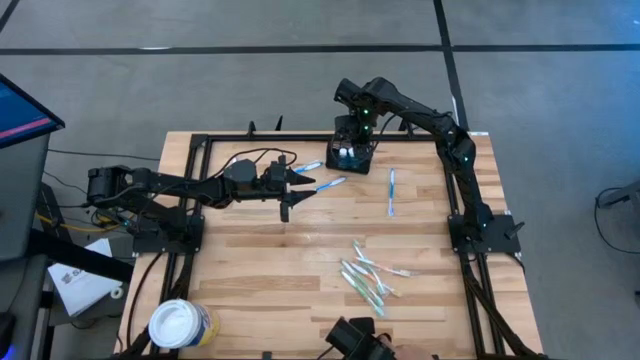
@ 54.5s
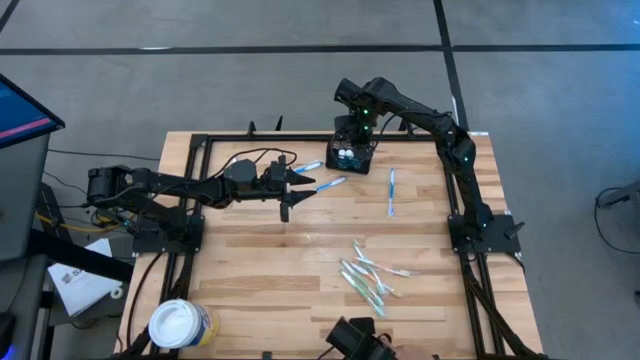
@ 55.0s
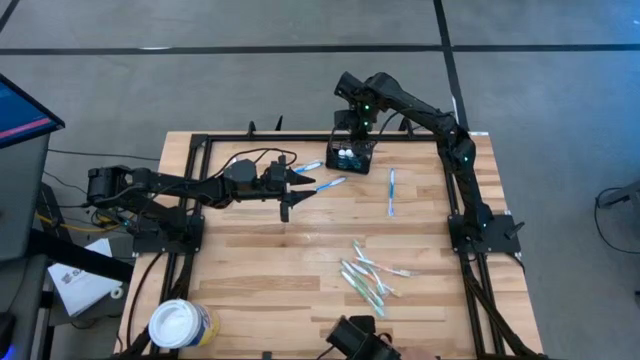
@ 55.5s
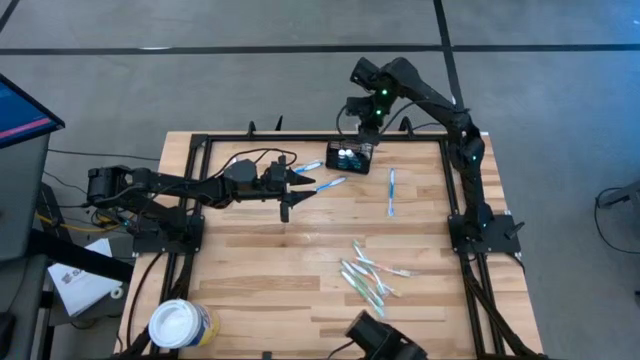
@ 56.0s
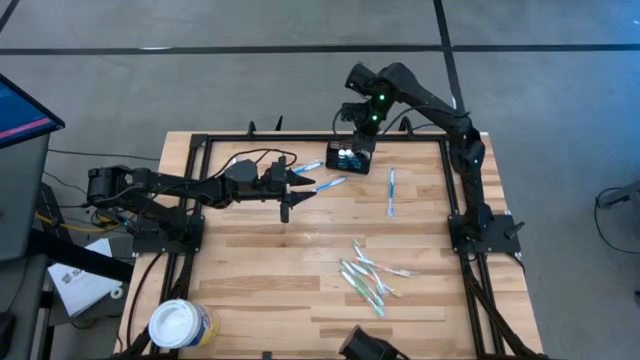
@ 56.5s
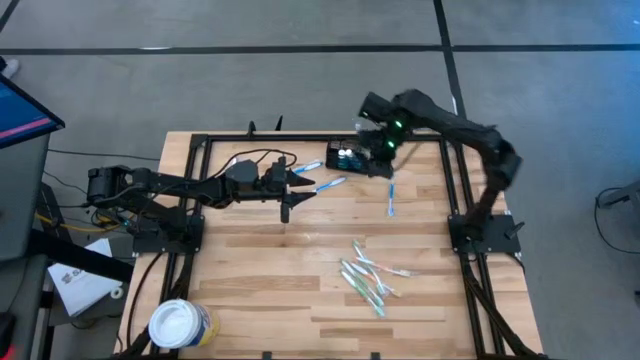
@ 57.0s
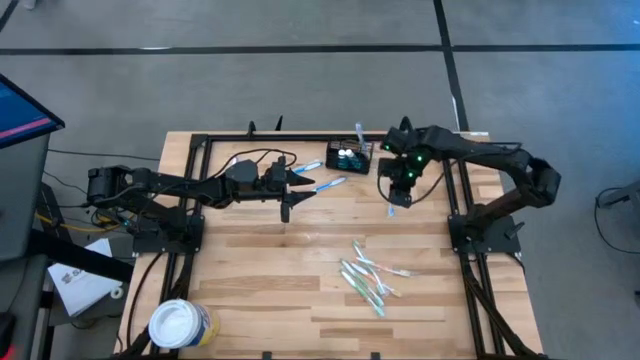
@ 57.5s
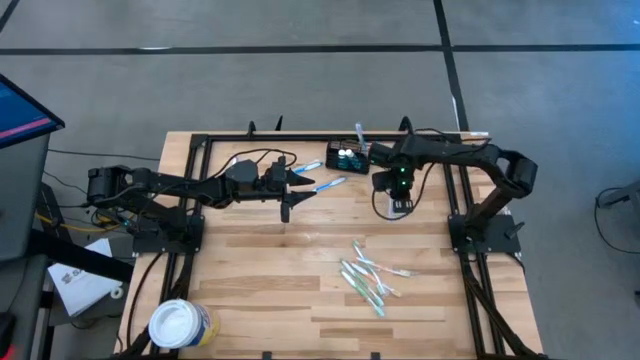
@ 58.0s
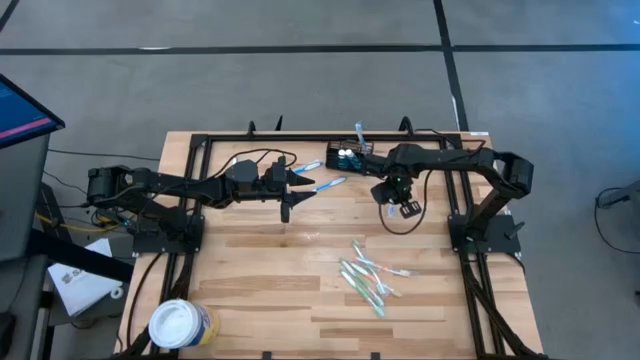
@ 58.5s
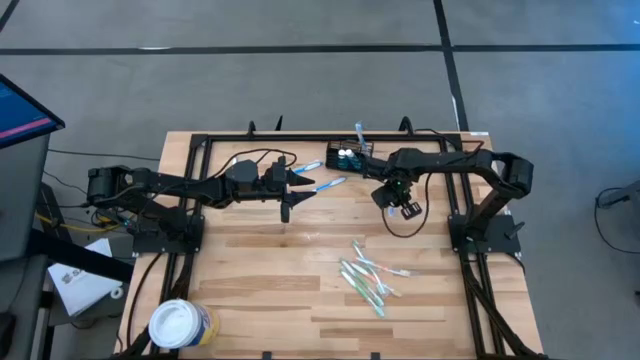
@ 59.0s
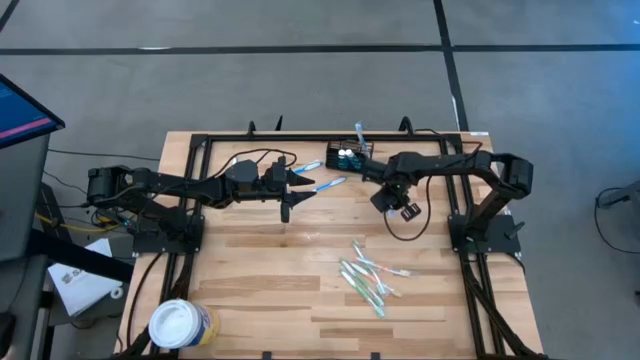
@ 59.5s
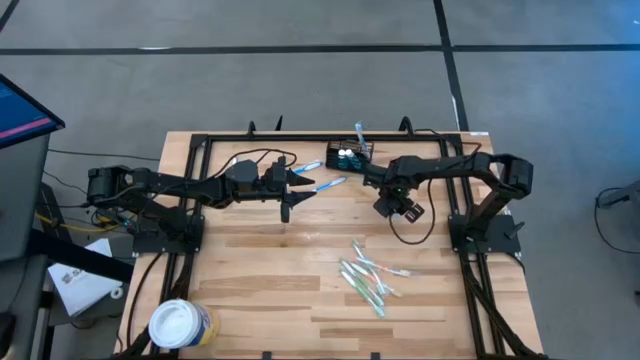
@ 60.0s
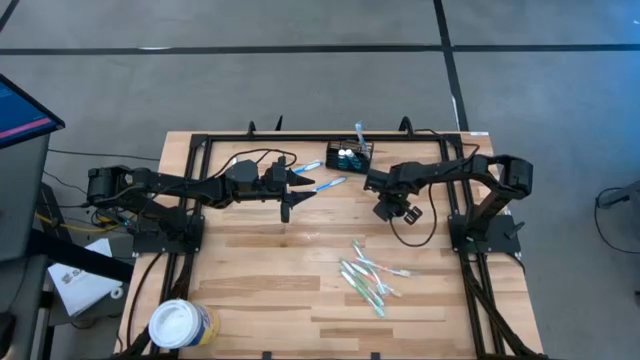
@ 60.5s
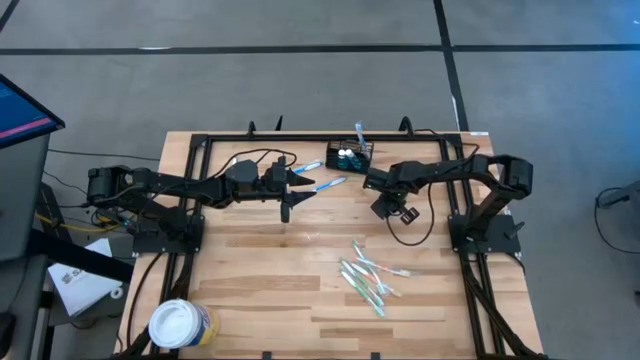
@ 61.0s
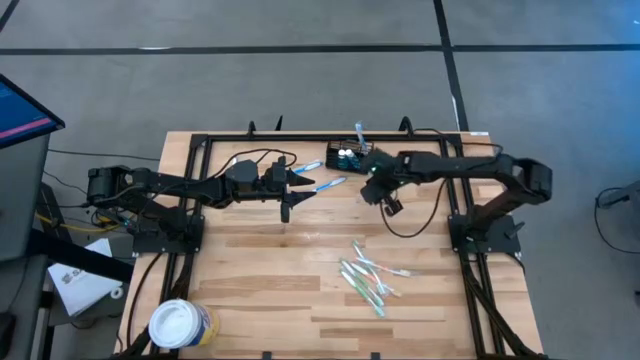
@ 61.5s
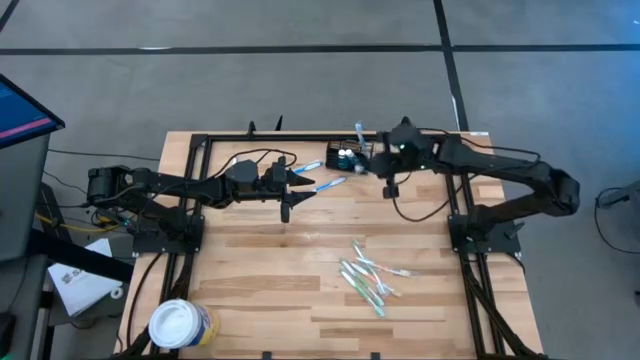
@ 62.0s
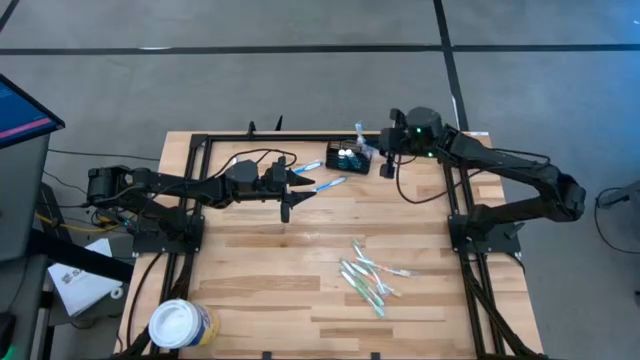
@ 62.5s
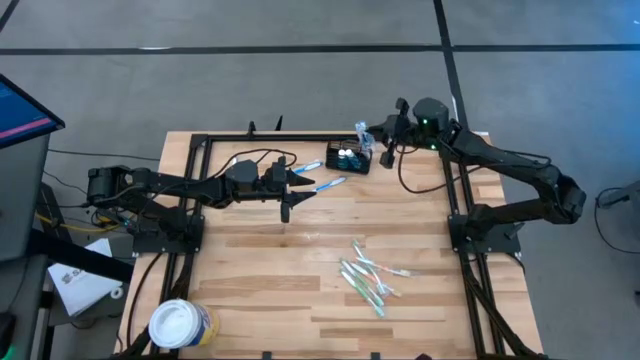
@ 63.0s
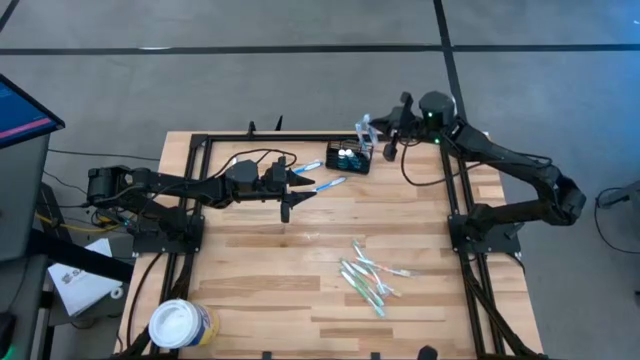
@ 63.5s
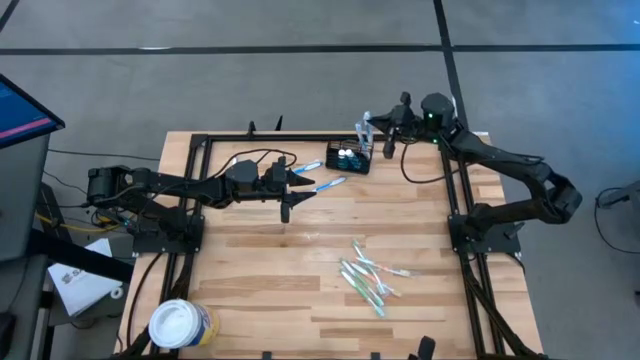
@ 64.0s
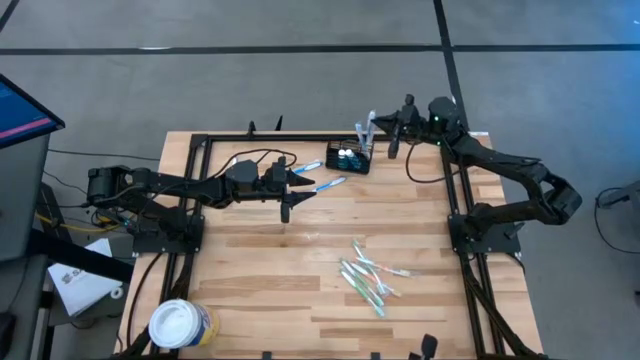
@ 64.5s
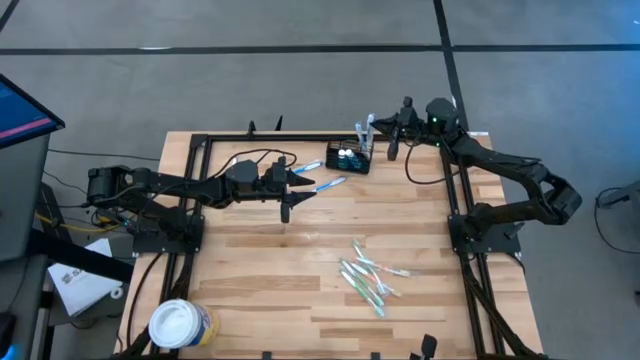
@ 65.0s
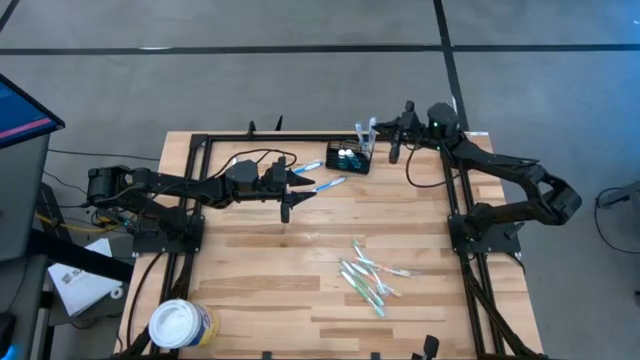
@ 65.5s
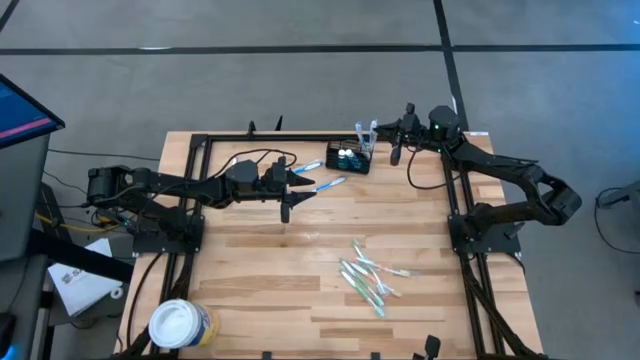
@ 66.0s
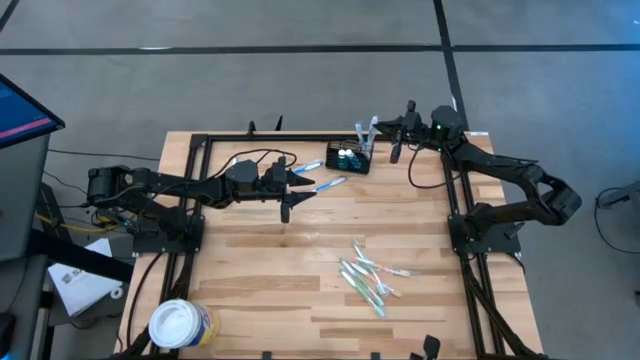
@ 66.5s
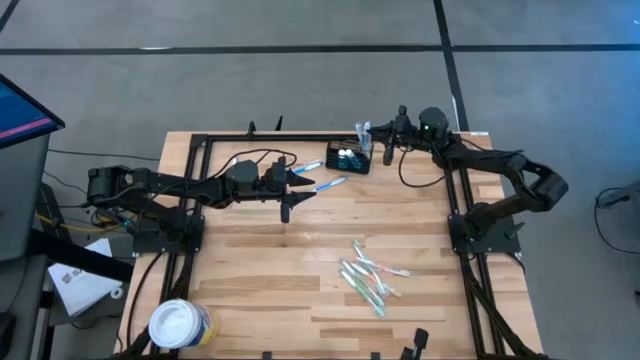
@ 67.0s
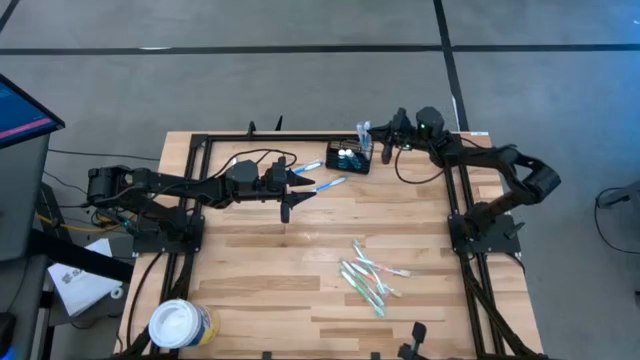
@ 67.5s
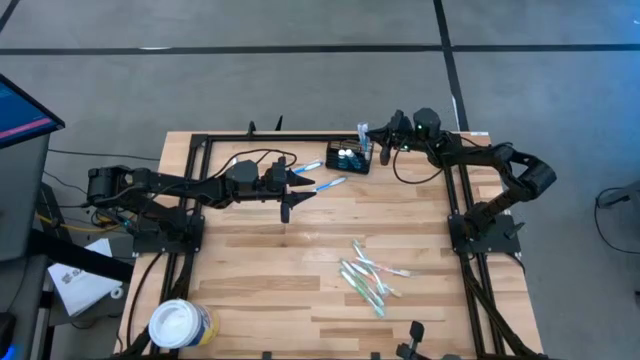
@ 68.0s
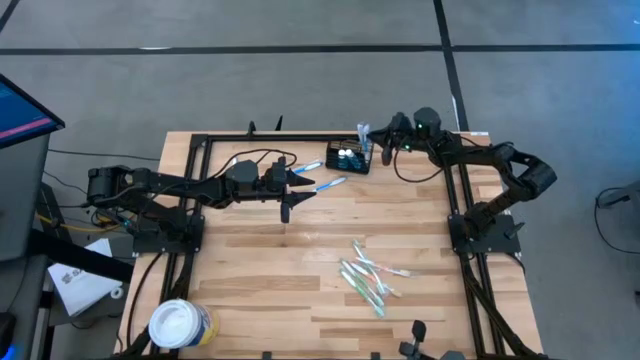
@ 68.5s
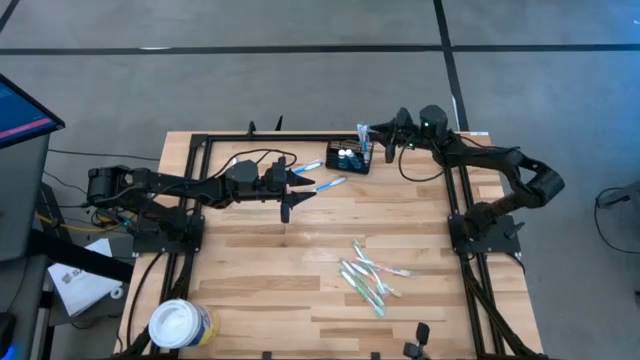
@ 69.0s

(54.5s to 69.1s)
Task: Pick & Place toothbrushing station
Put the blue toothbrush into the mesh organizer

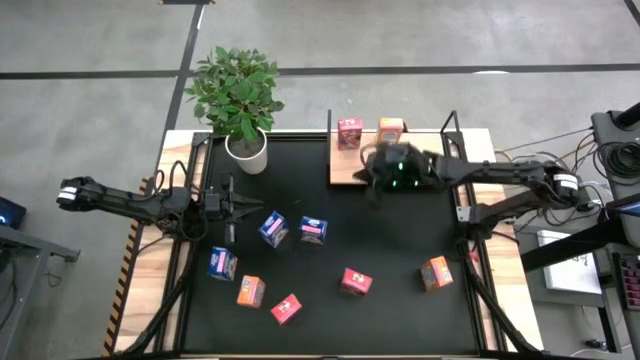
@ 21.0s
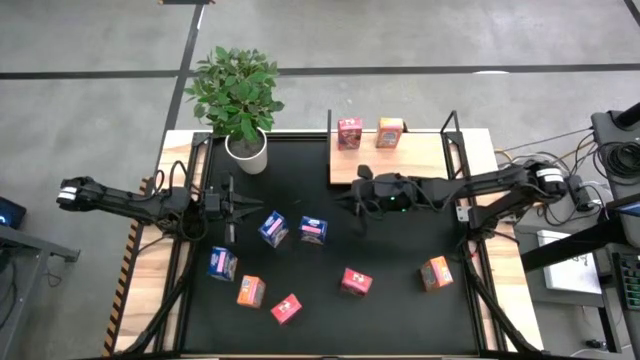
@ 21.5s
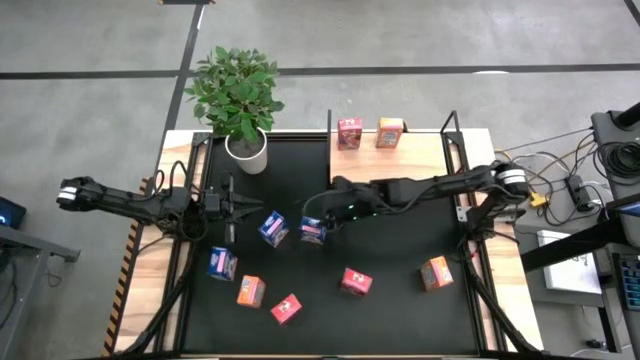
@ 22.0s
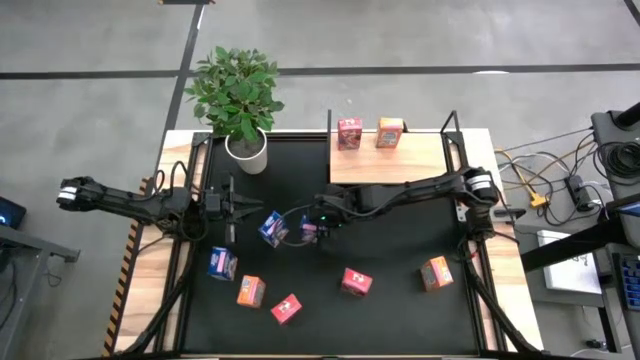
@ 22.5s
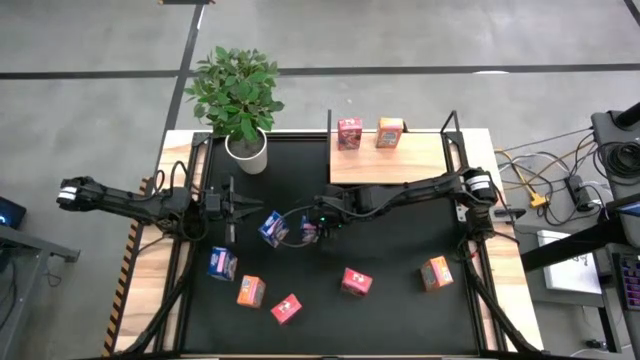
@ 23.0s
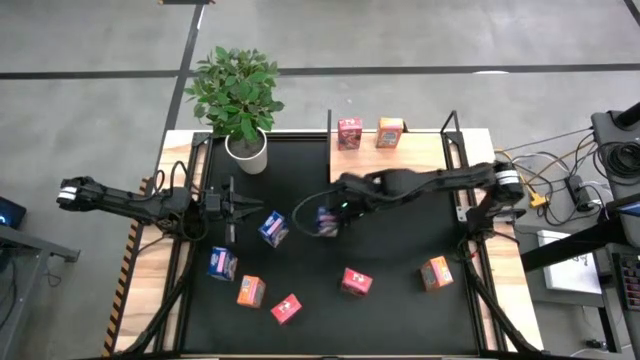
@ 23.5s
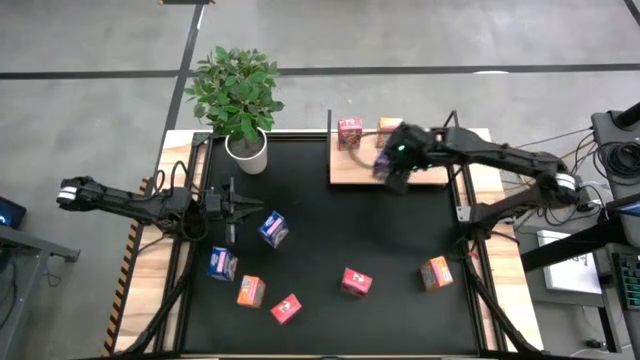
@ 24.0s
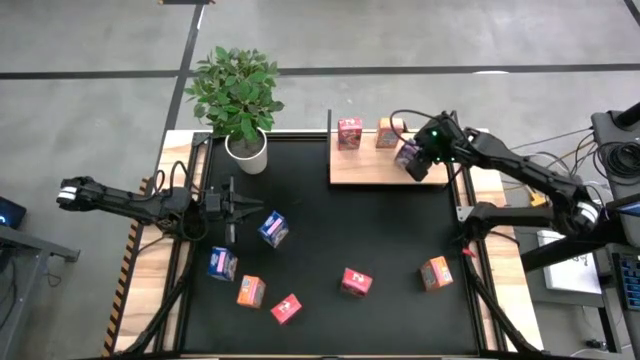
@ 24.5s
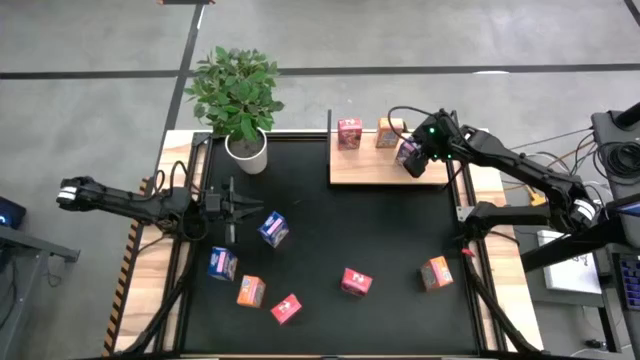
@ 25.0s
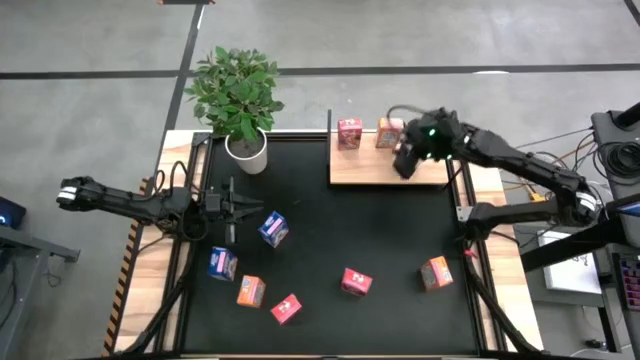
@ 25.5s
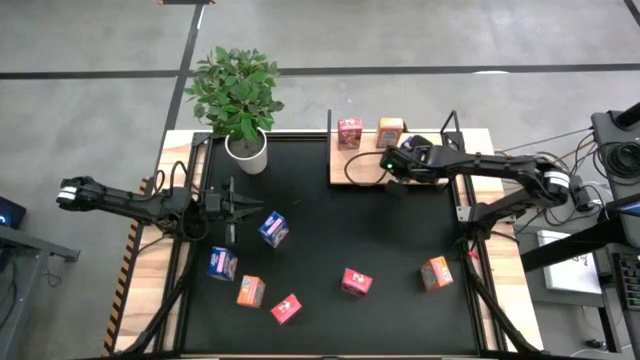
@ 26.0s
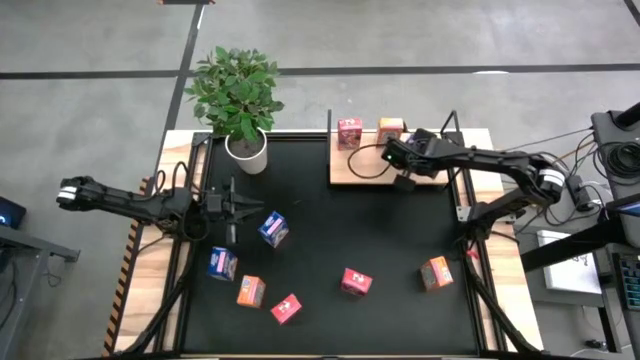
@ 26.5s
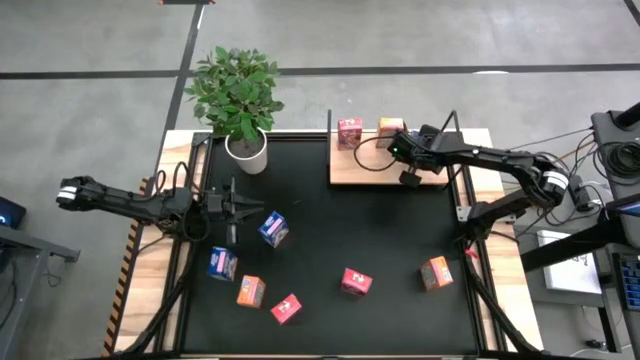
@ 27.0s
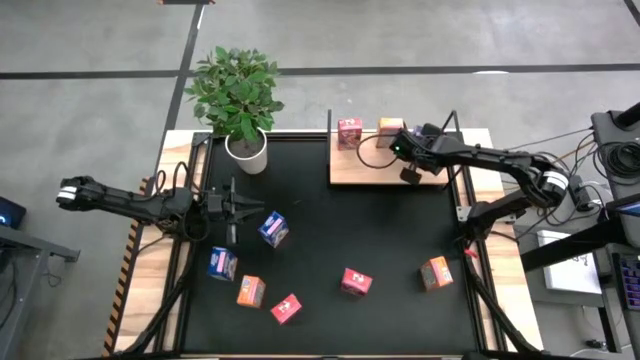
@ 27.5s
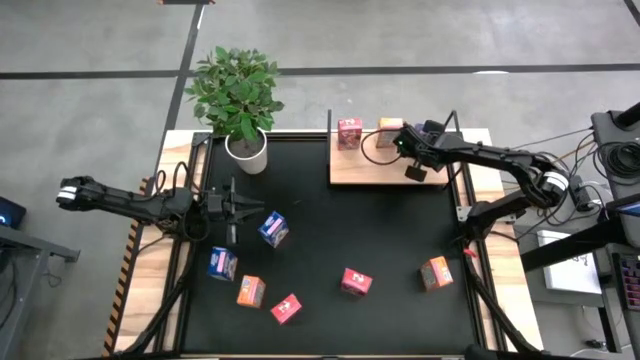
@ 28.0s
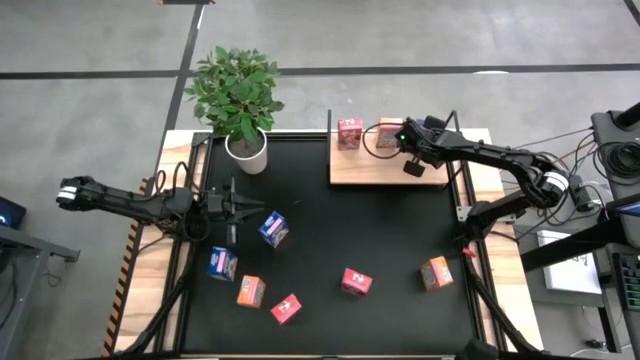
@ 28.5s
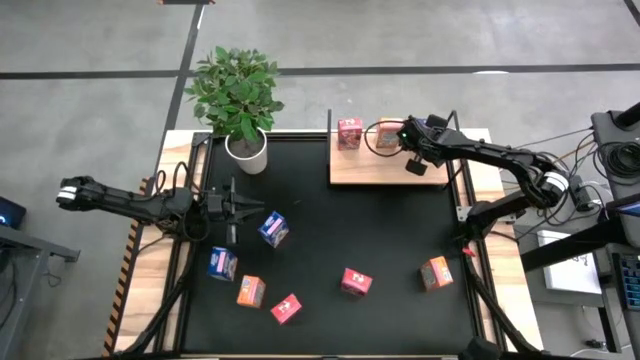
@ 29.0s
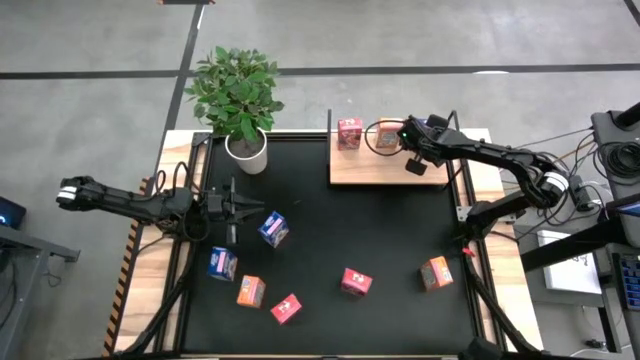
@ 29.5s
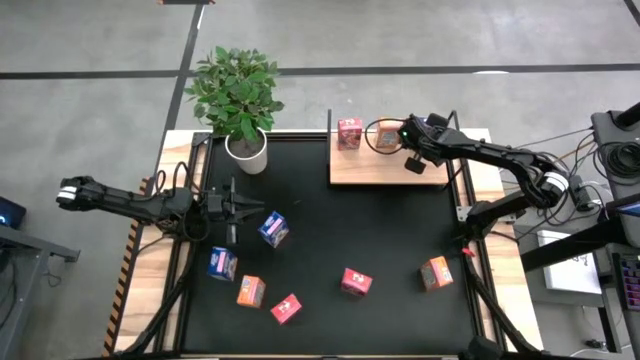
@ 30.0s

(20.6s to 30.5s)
Task: Stack cereal on shelf
Put the right blue cereal box on the shelf
